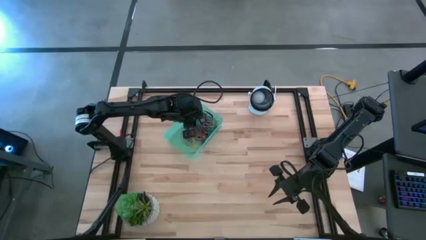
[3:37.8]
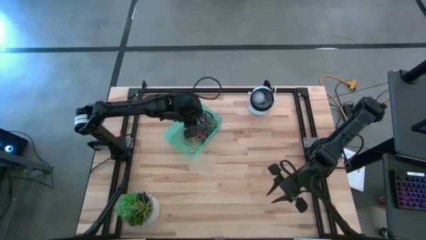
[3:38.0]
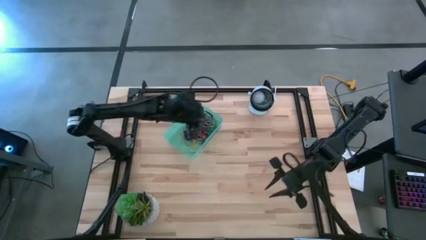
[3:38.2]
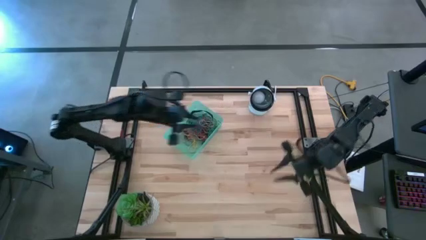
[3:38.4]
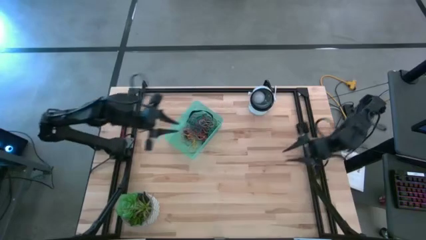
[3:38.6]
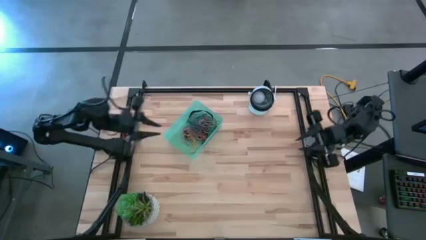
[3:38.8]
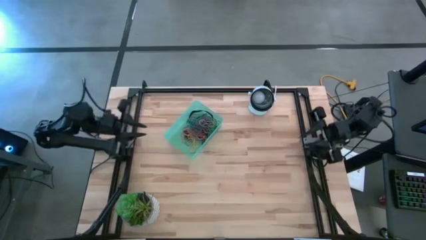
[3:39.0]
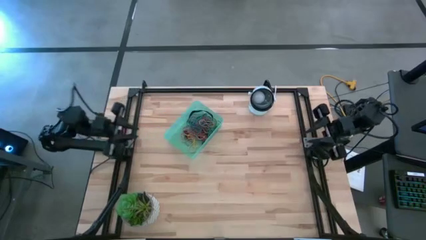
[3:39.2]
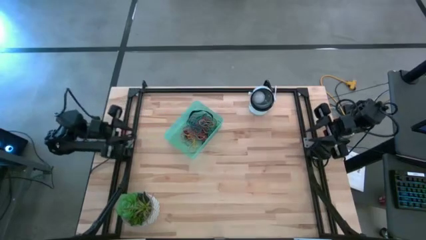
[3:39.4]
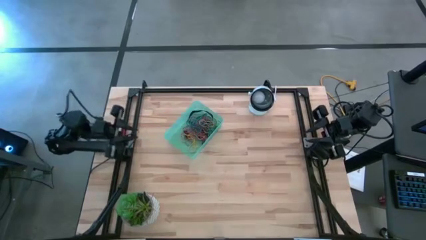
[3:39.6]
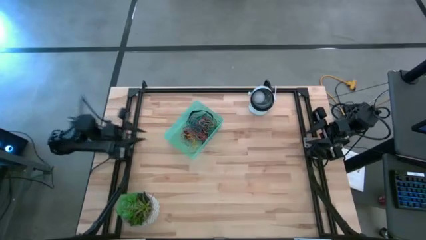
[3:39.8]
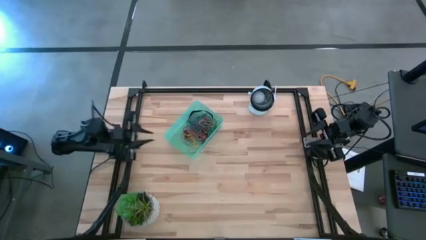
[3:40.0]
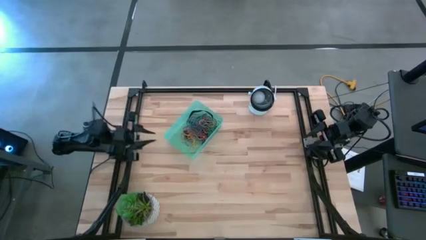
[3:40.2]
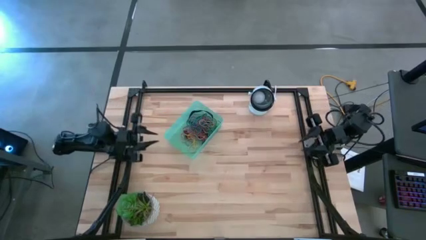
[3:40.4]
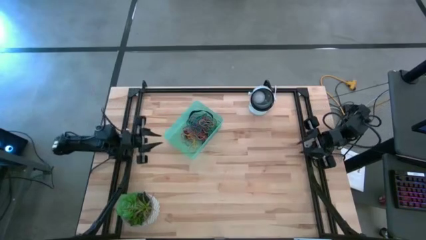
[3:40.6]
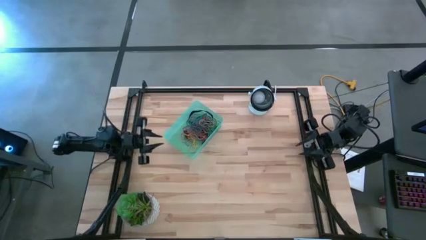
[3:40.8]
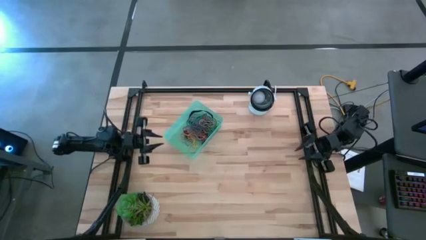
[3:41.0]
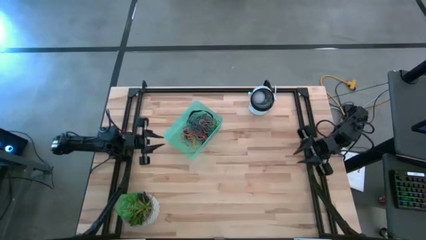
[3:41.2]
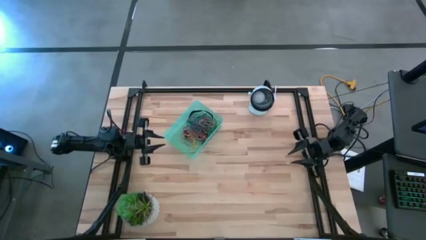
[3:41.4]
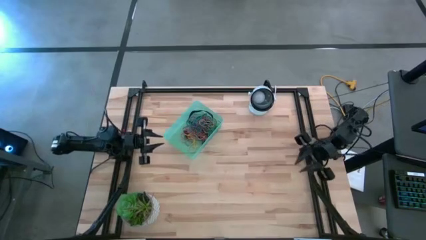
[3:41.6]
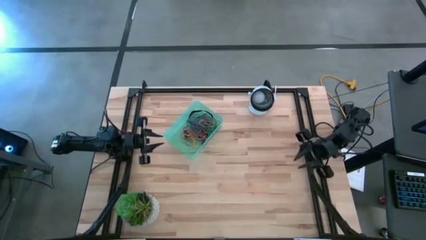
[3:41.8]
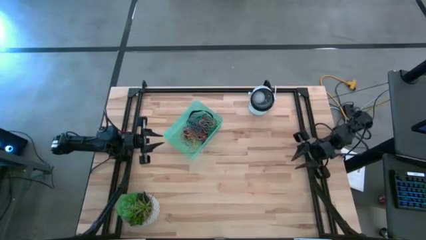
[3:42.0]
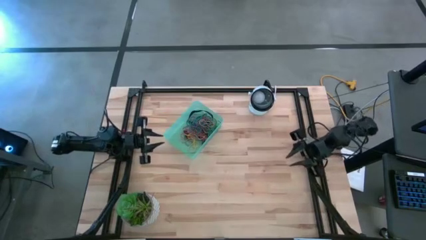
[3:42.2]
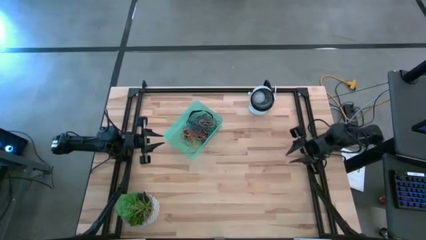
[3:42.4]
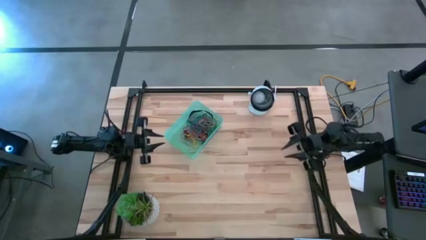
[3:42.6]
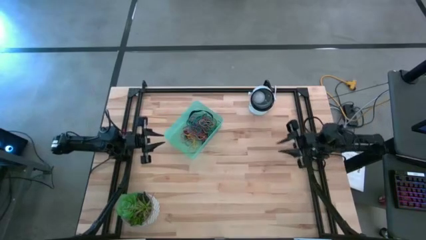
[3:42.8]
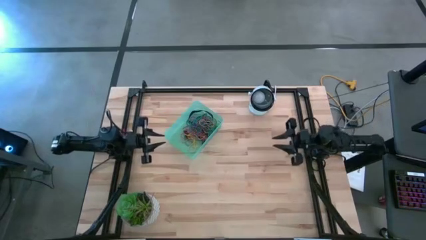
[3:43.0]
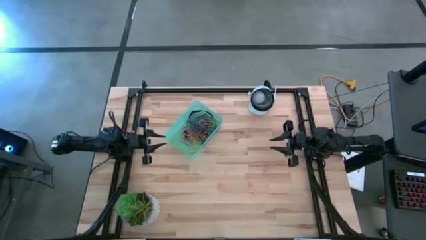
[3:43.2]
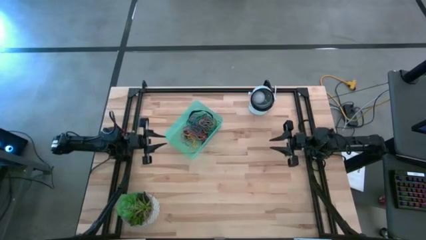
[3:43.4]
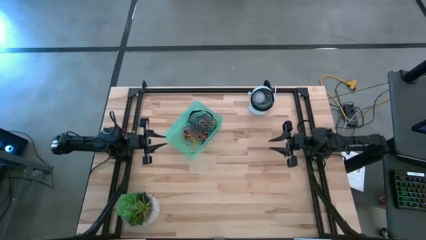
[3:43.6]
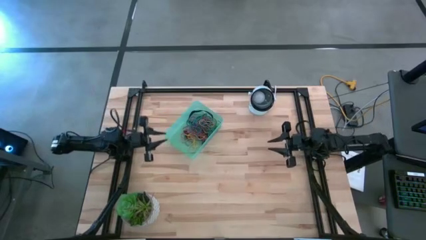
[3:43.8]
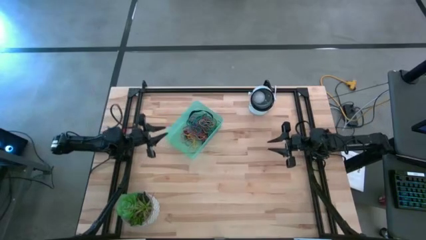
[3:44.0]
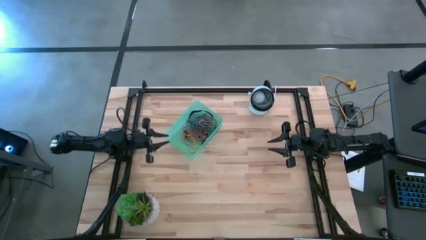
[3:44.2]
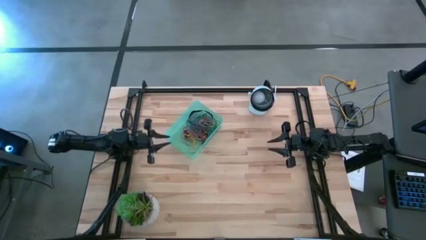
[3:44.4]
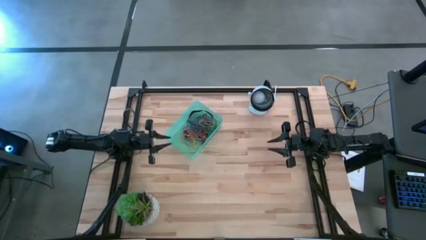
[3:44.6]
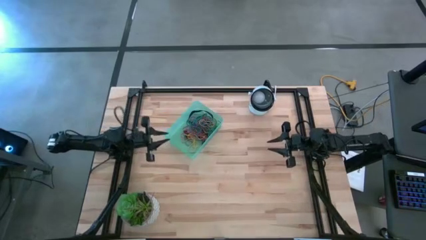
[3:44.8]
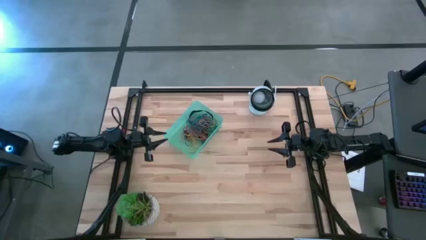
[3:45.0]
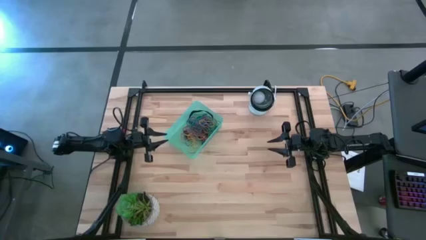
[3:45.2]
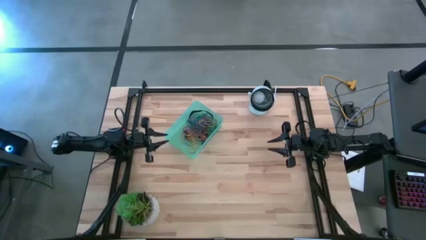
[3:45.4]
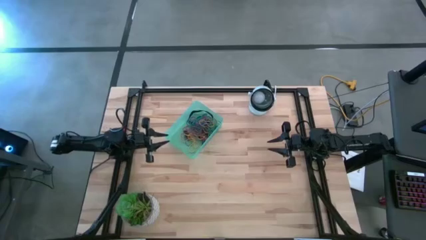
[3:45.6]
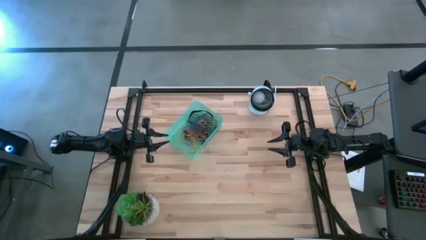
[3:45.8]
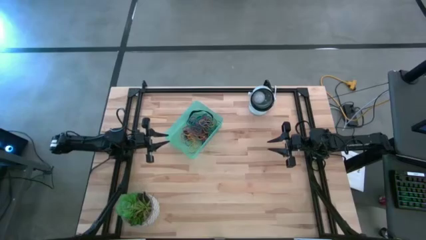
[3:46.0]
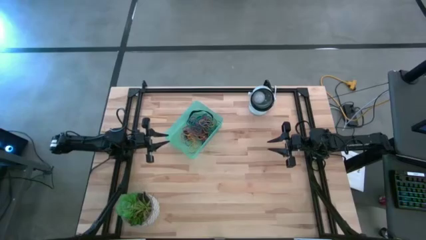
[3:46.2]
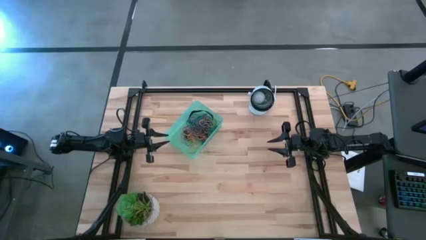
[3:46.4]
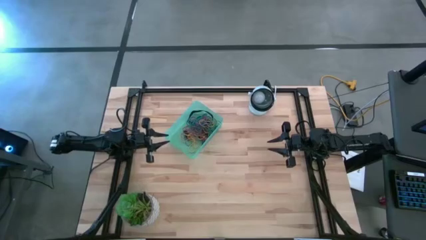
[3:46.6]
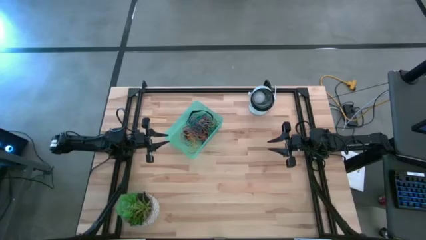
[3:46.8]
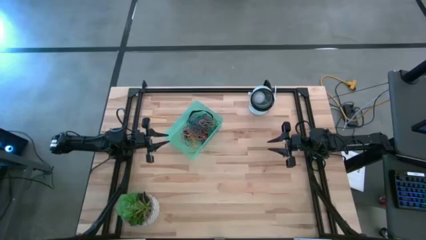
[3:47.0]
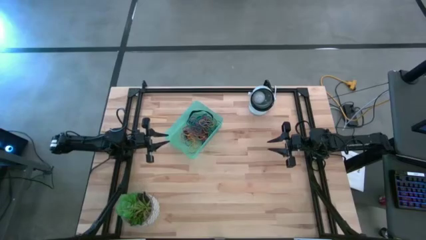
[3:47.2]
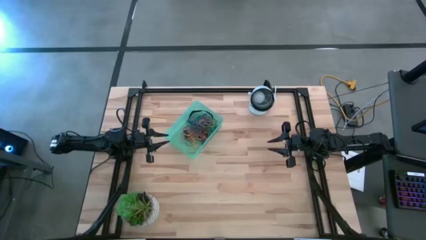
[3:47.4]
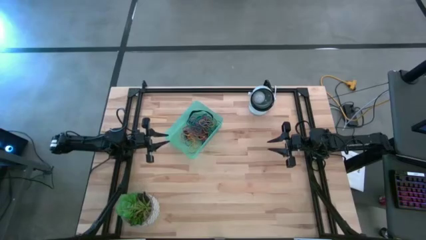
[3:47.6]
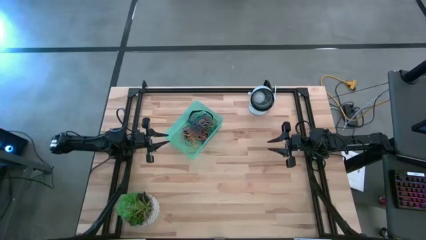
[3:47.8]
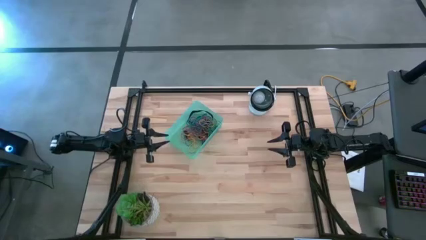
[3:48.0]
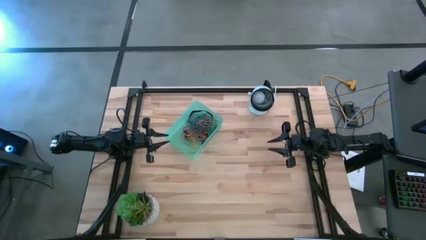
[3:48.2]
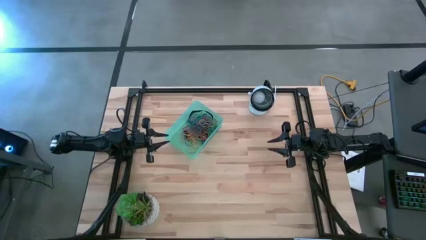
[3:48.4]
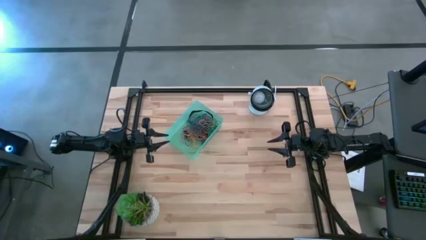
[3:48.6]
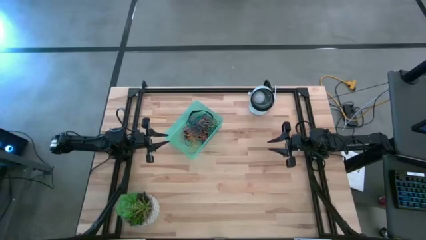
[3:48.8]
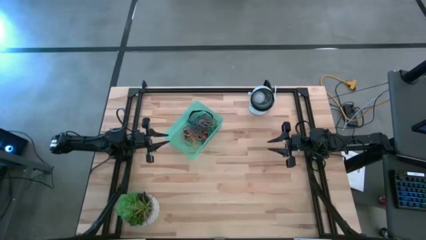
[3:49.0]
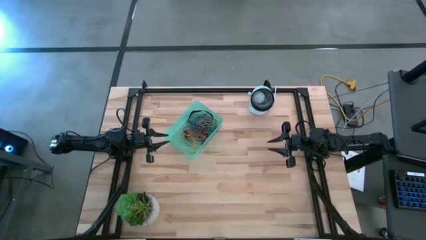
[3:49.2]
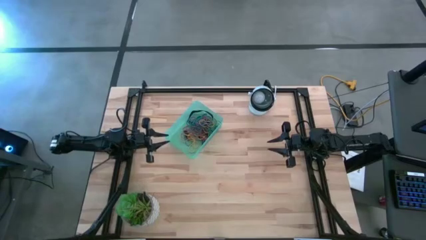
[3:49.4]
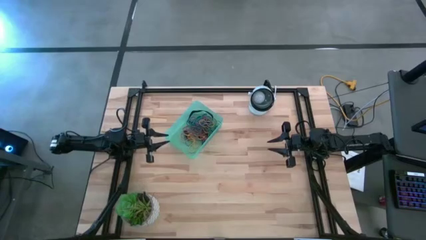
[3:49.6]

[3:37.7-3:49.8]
Task: Pick and place rubber bands into bin
Return to Home Position
